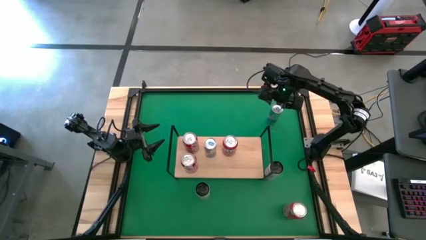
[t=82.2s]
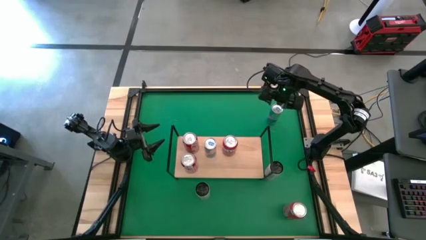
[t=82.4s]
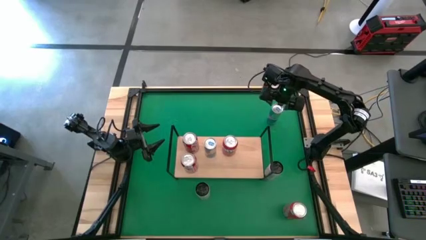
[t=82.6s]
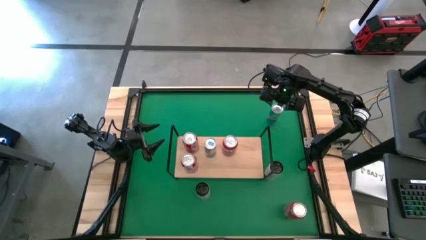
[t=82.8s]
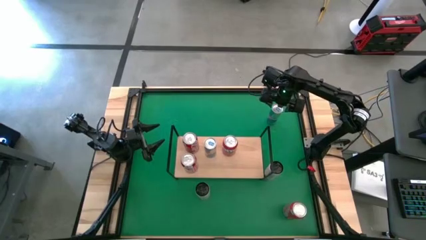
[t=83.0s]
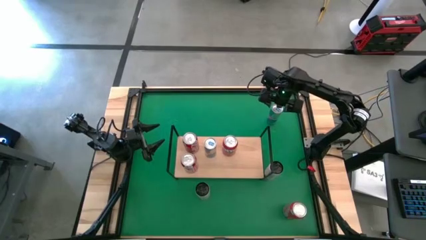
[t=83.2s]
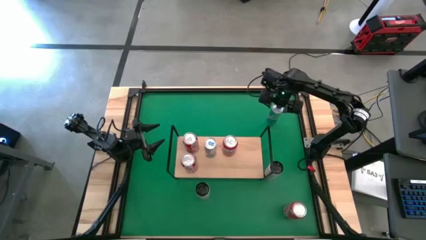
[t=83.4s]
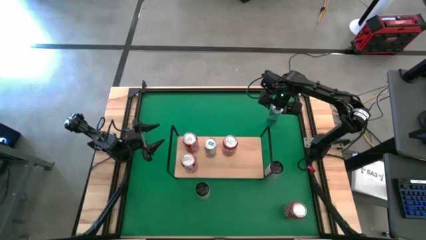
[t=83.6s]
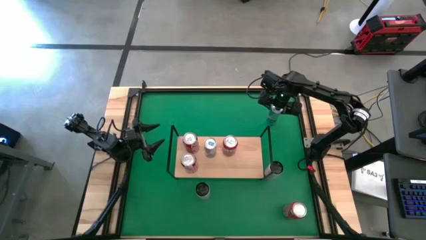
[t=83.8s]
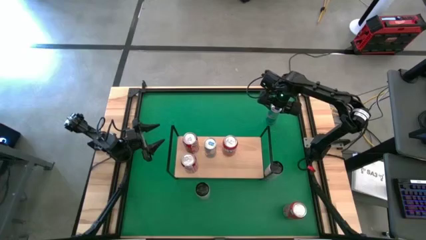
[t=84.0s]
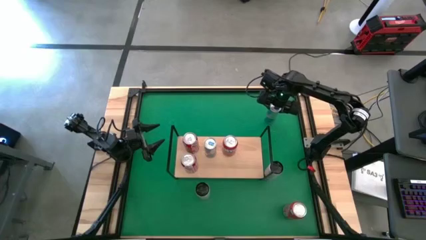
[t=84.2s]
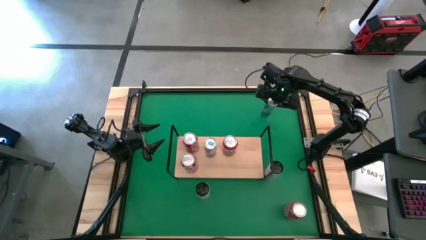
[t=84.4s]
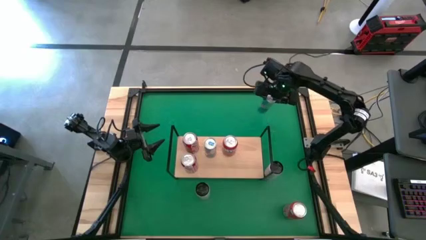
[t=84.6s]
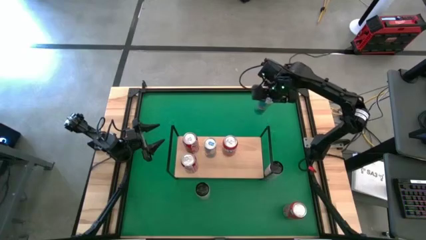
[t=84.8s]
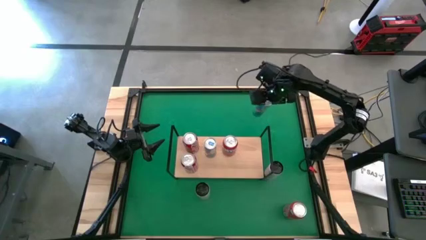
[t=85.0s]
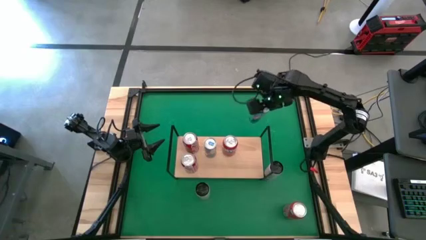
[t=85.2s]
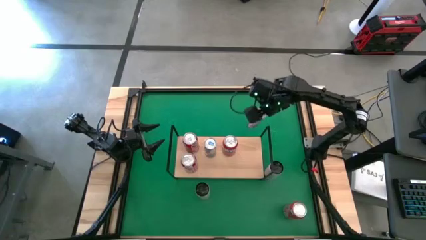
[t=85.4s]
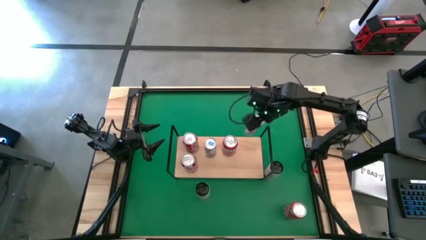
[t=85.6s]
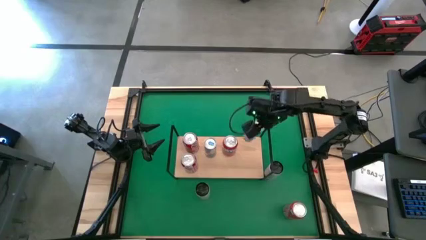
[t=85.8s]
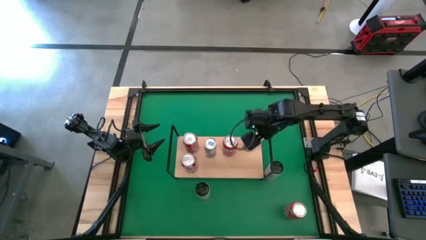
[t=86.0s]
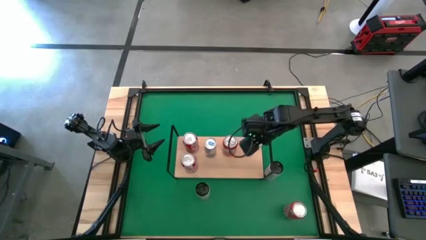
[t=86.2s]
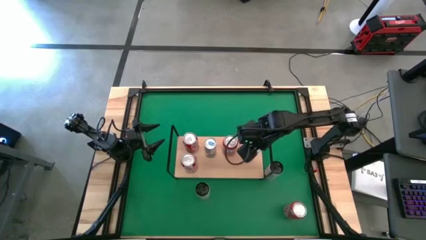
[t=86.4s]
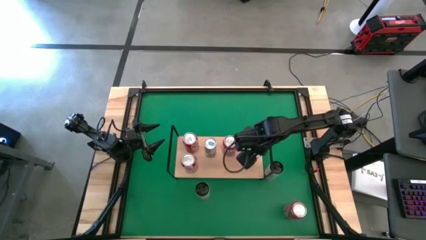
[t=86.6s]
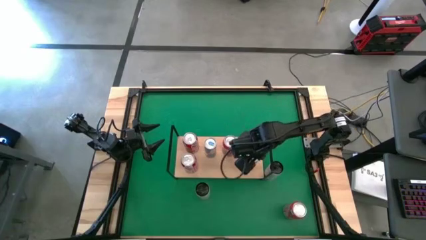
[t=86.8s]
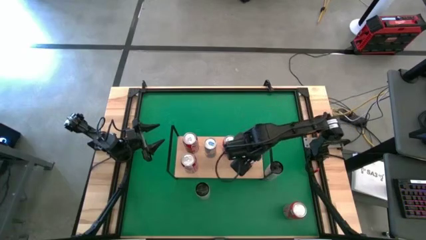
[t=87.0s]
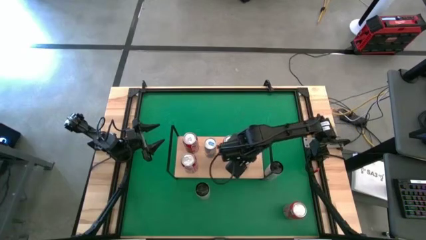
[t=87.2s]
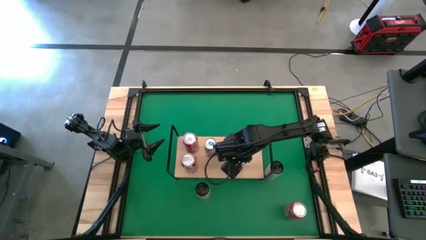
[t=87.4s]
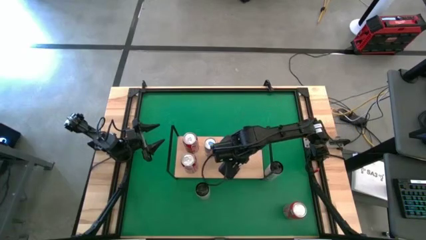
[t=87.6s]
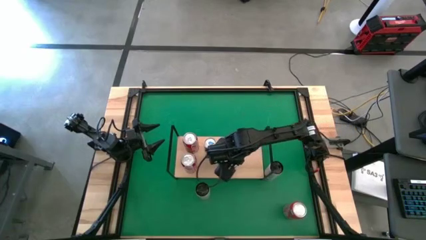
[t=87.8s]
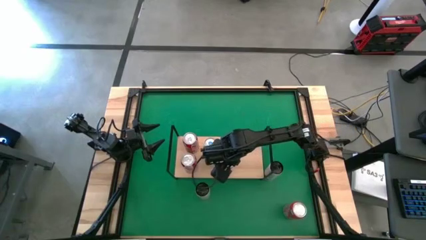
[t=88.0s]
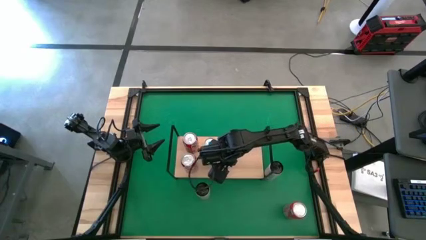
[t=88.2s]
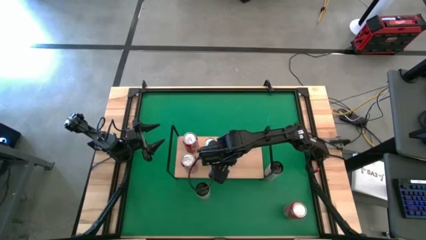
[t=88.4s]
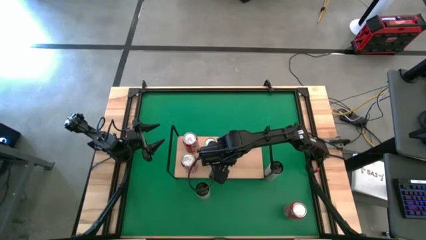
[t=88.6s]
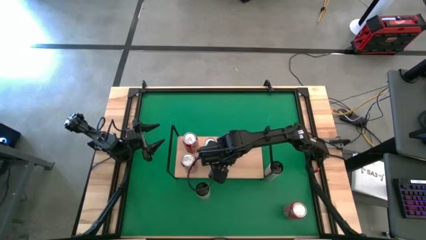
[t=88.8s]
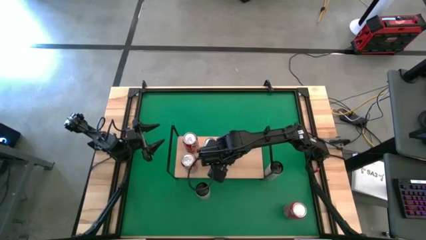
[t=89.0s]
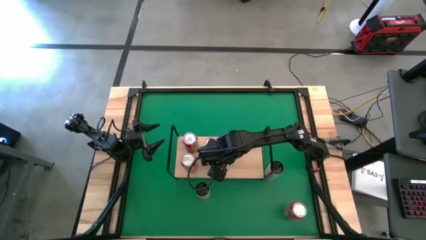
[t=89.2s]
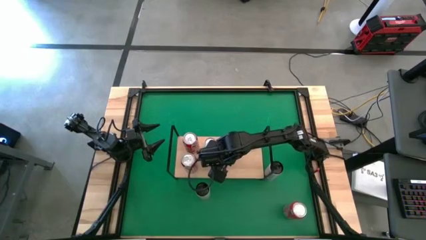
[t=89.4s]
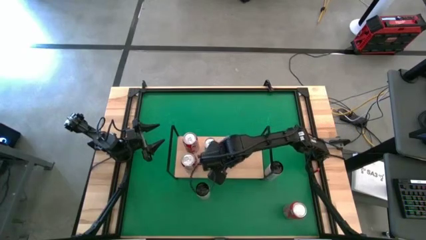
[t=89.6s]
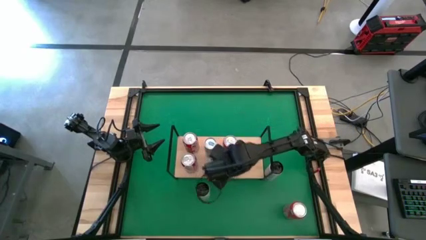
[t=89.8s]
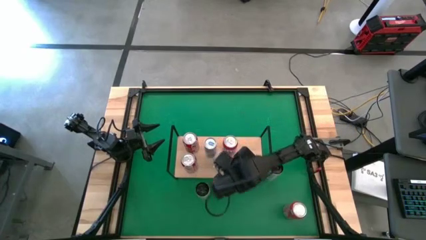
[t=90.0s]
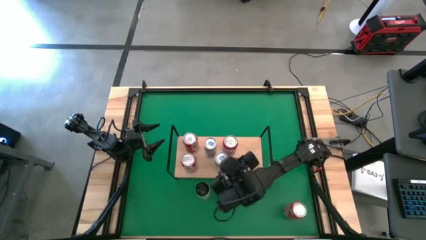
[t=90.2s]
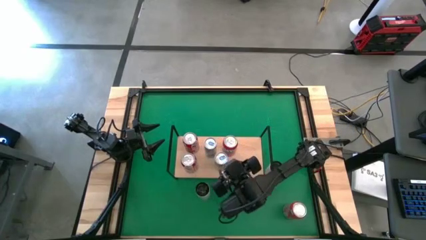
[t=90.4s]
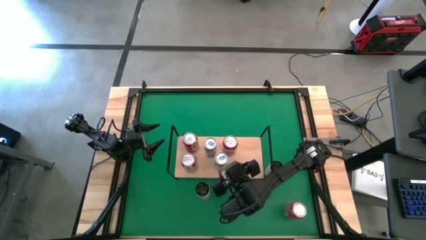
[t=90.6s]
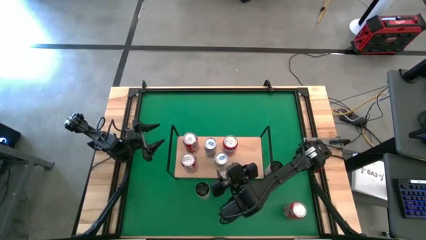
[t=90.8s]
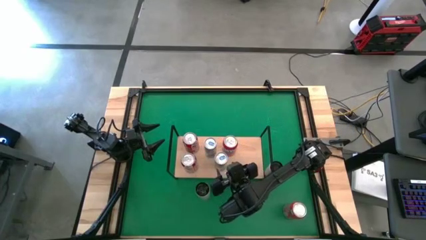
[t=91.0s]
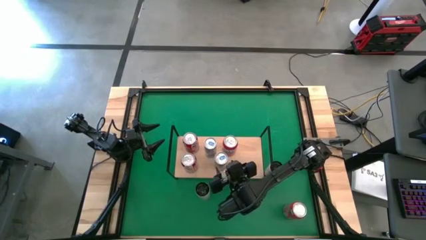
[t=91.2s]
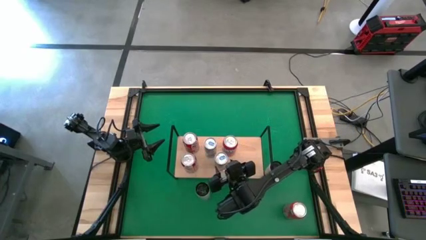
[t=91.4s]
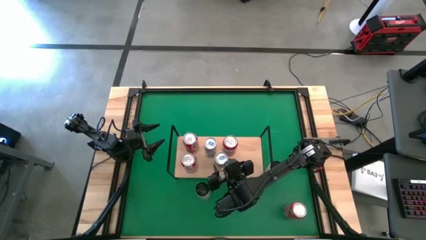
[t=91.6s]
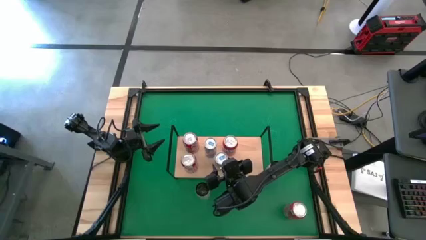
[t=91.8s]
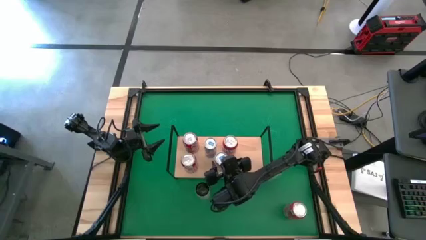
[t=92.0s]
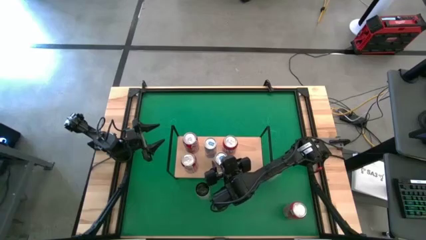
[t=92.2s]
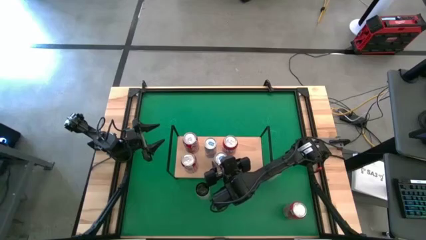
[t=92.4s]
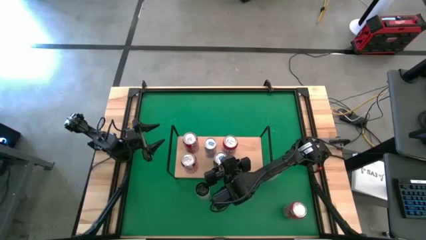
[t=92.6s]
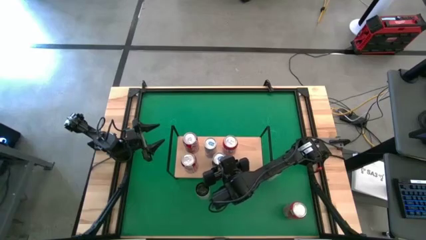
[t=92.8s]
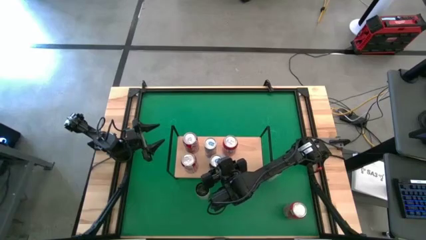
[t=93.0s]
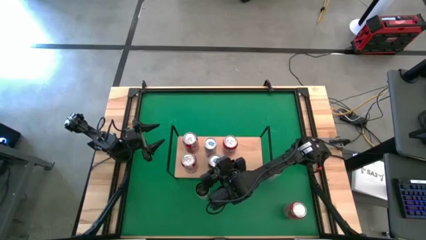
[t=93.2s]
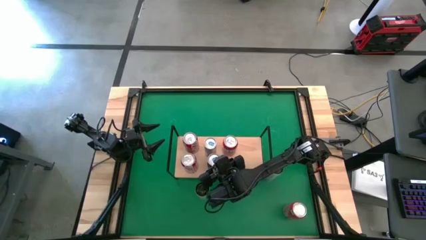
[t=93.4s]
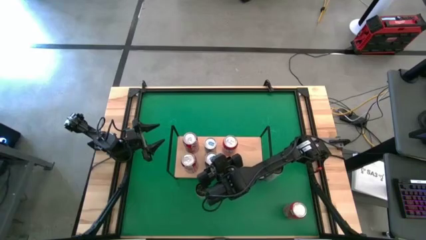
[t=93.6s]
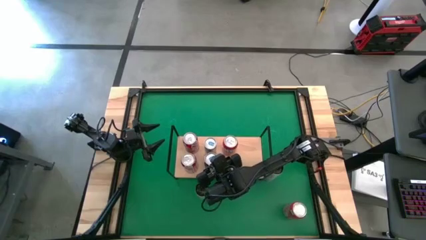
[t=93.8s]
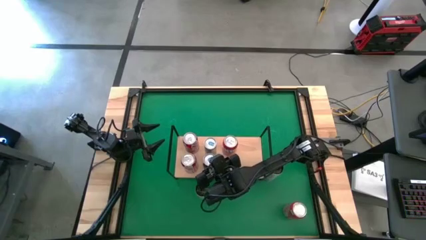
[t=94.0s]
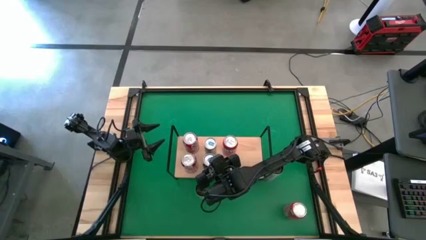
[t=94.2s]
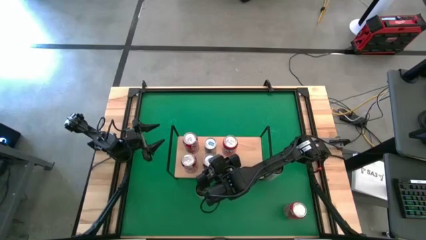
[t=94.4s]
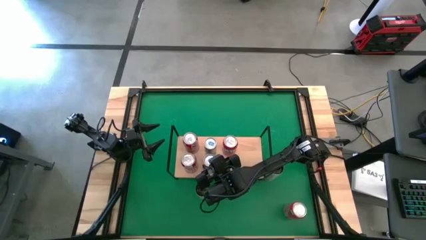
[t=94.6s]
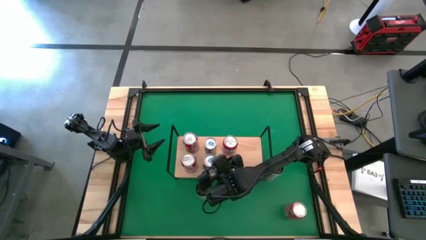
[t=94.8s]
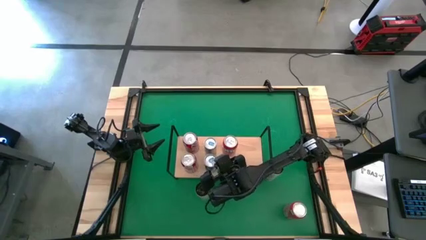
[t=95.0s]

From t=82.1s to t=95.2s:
Task: Place canned beverage on shelf
Put the blue soda can on the shelf

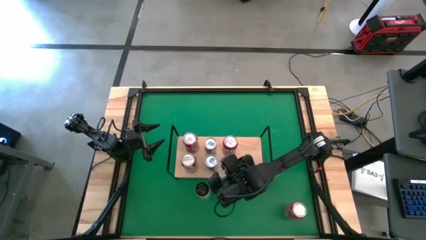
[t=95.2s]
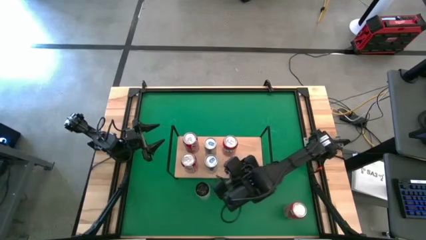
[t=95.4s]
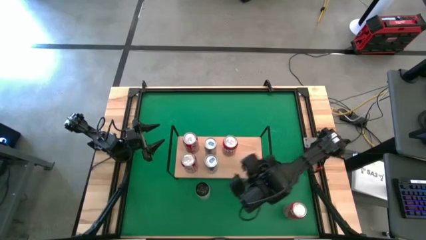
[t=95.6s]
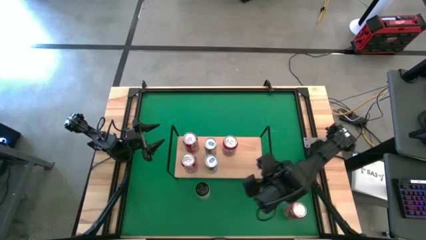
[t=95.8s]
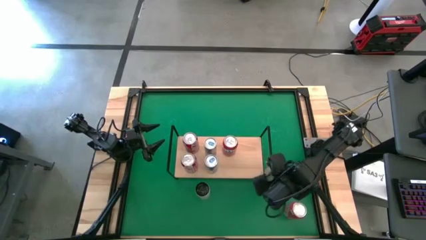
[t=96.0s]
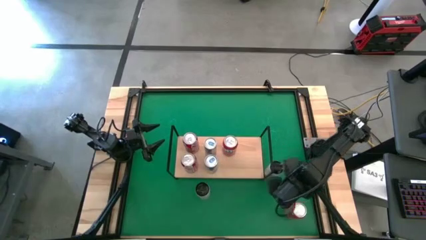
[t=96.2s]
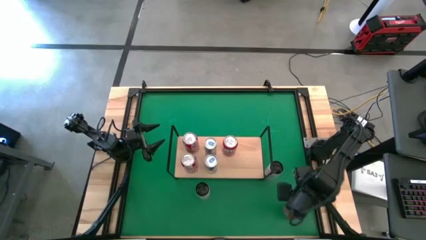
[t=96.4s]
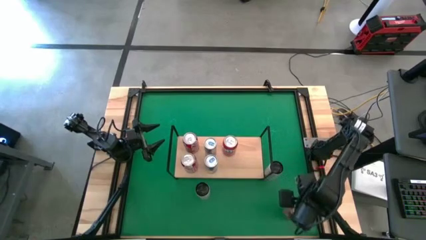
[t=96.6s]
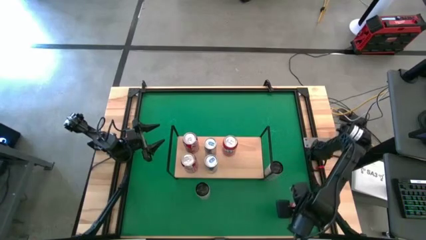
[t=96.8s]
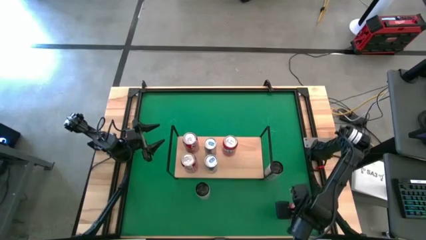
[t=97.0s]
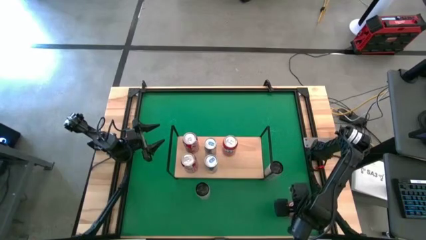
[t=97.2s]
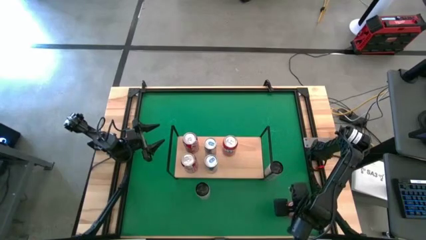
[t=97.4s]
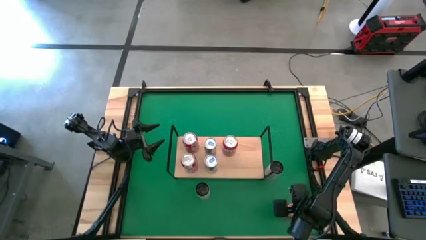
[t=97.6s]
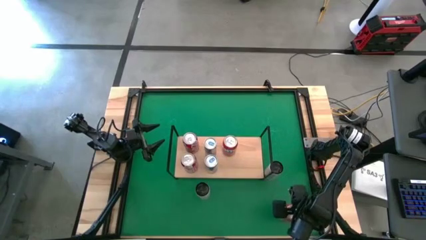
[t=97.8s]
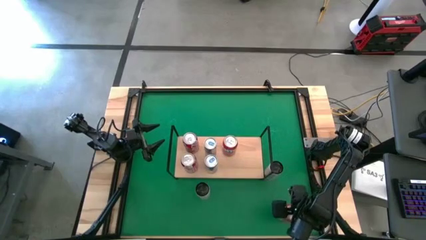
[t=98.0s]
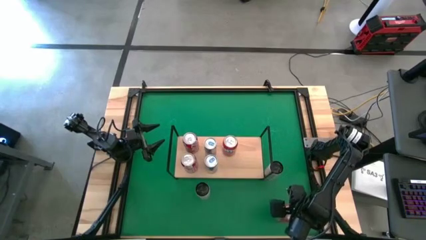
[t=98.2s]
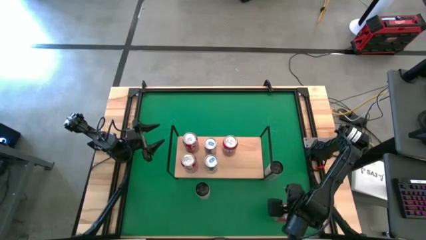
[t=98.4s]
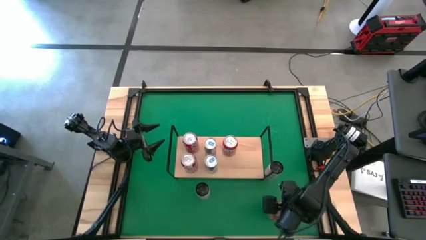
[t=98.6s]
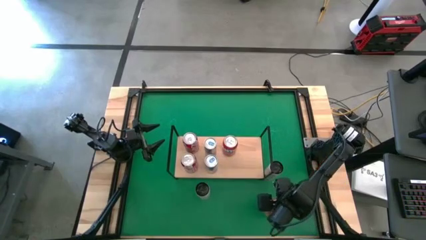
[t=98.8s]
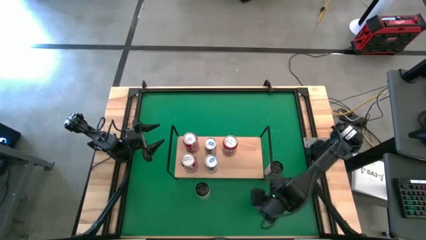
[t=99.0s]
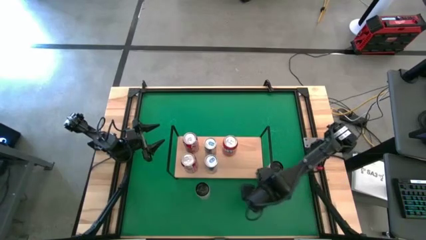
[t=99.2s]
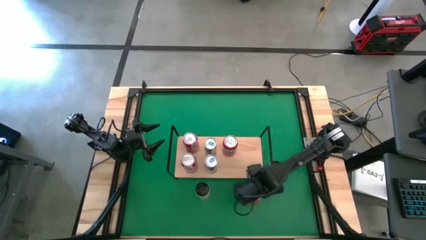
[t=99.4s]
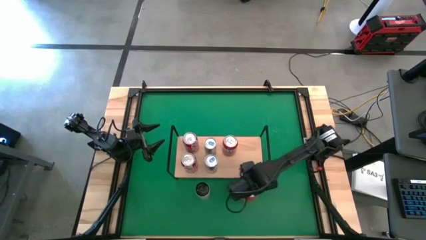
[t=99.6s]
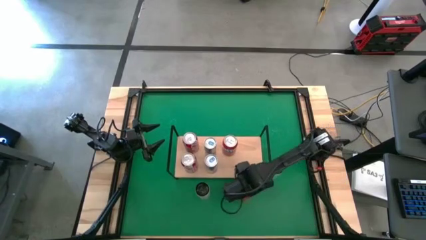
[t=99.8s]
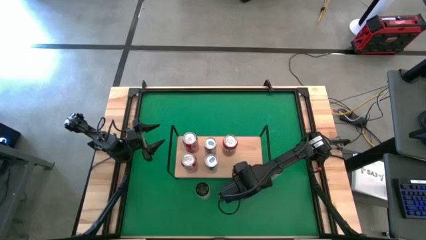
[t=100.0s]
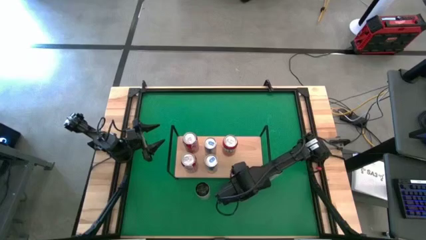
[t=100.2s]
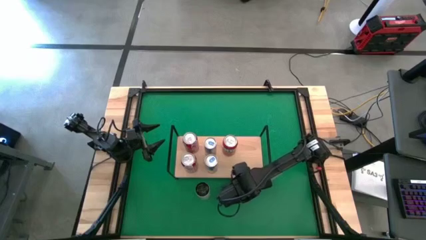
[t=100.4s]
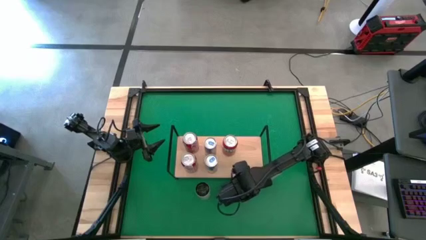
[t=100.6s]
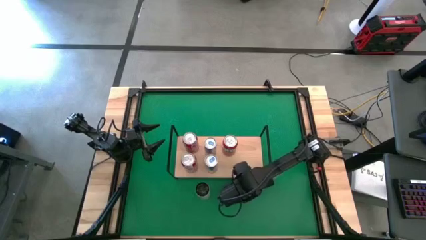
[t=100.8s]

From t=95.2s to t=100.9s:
Move the orange soda can to the center of the table
